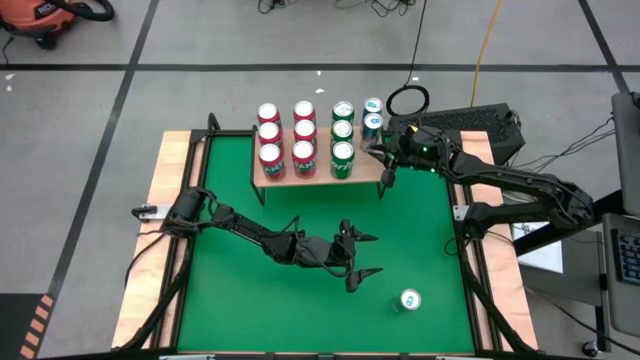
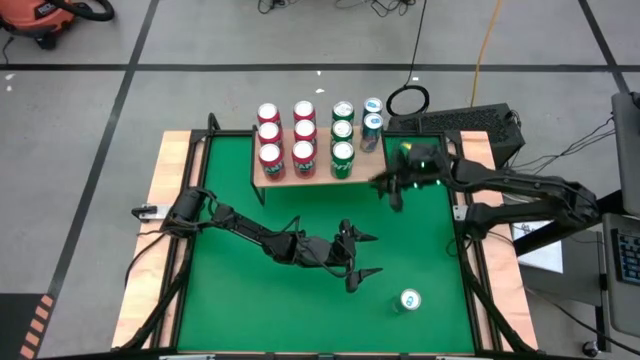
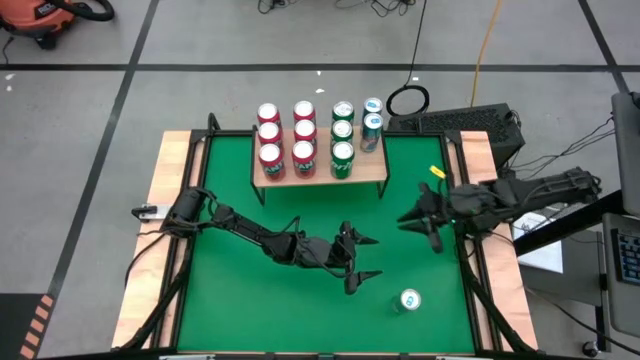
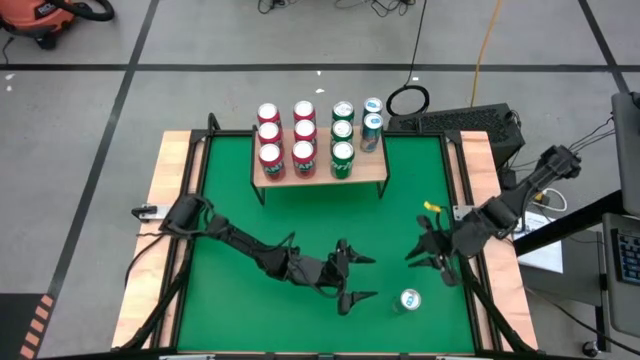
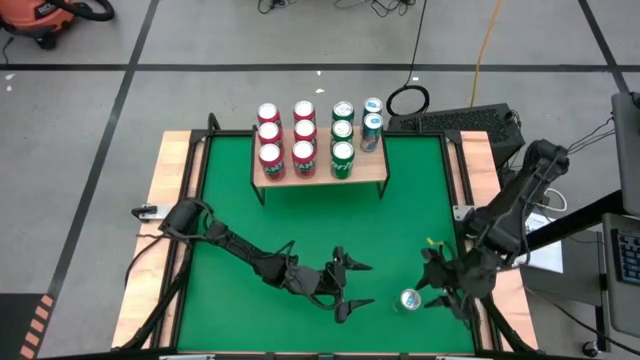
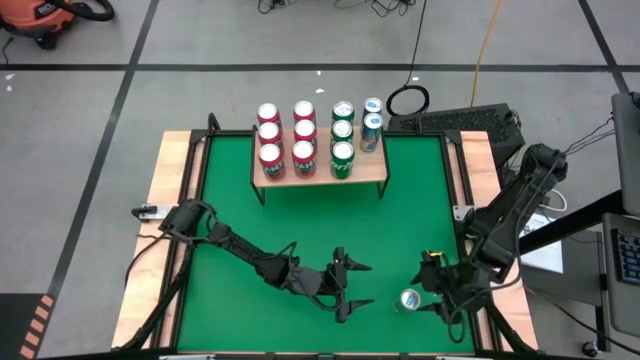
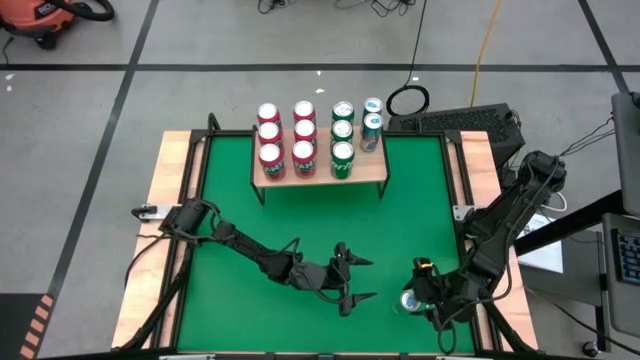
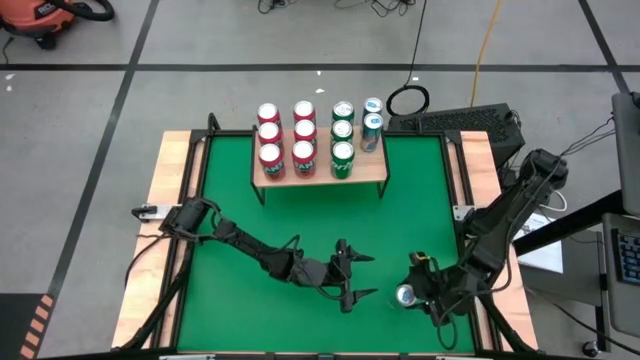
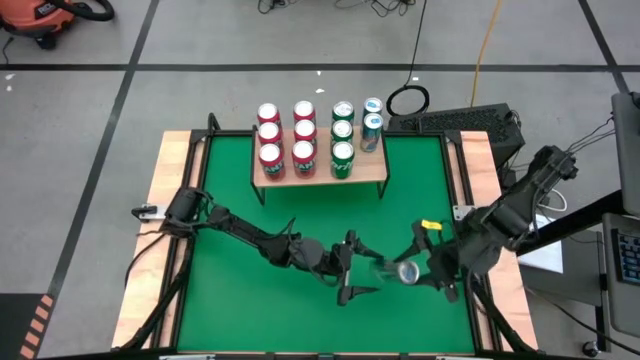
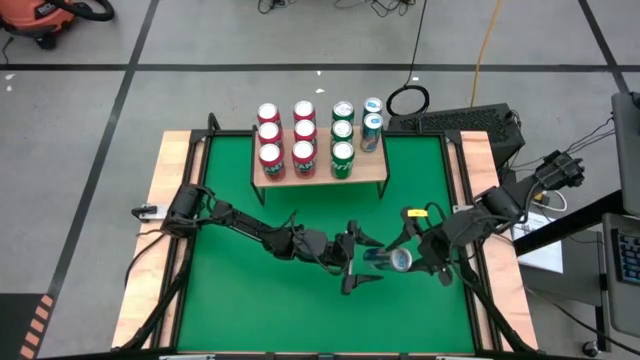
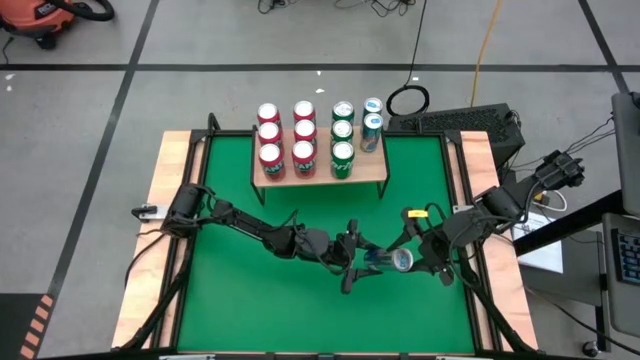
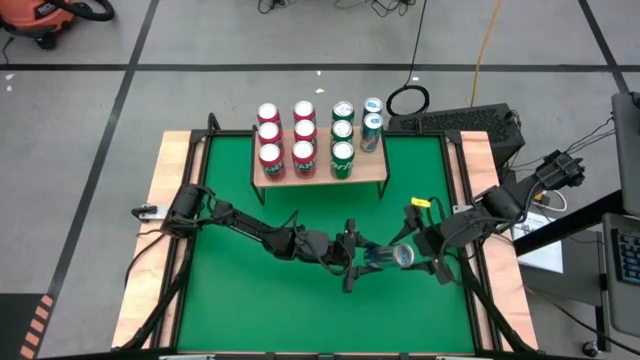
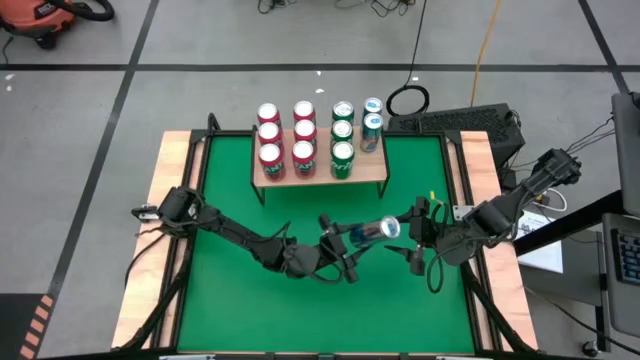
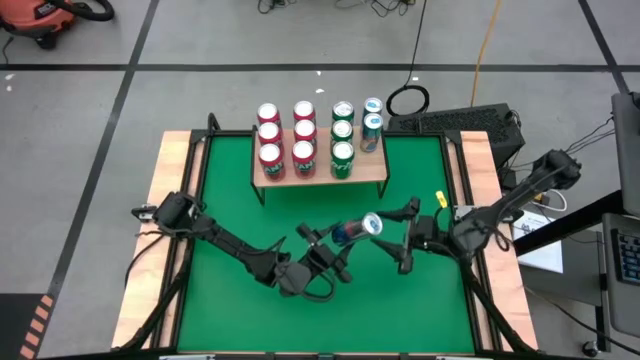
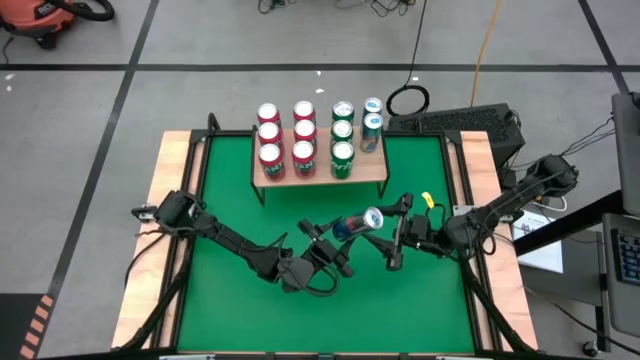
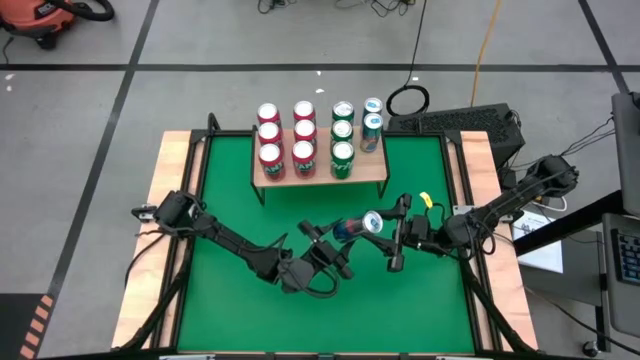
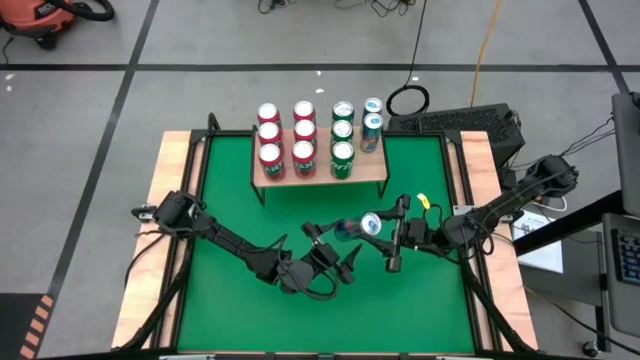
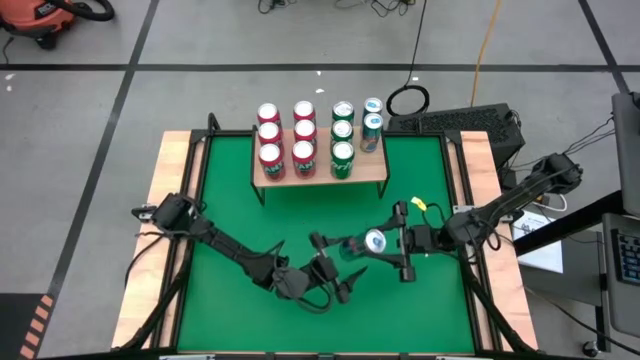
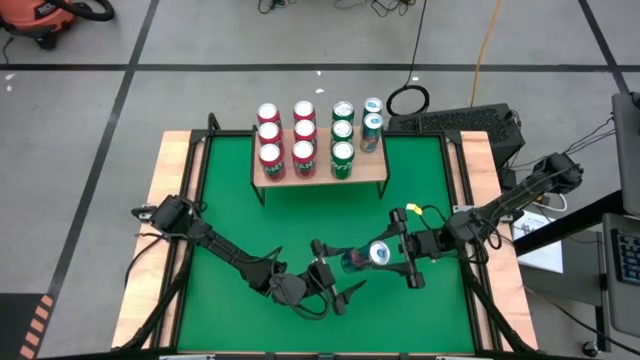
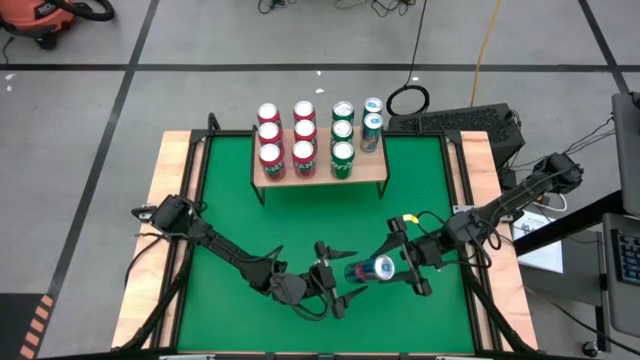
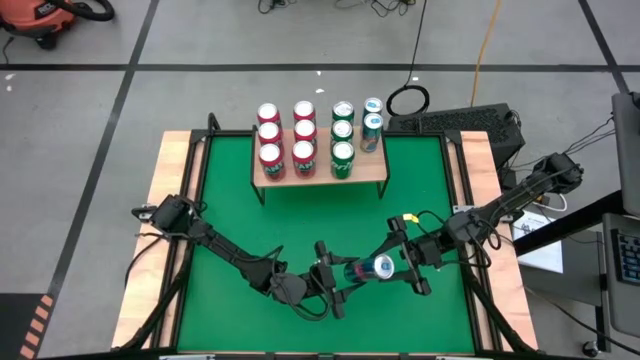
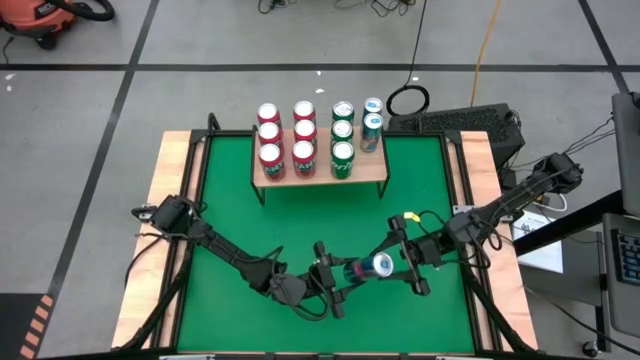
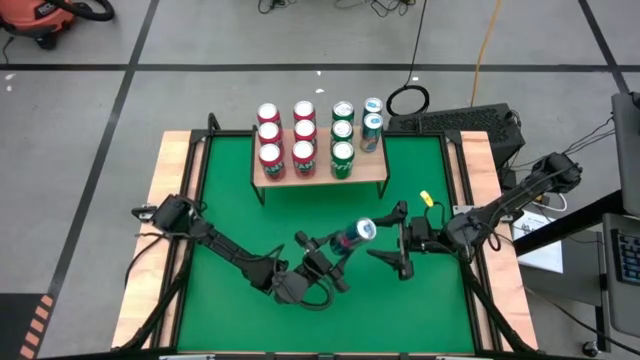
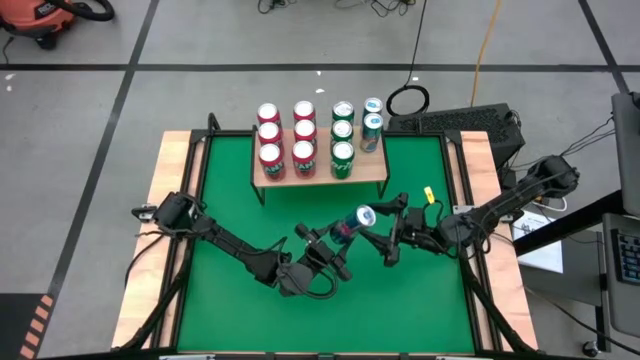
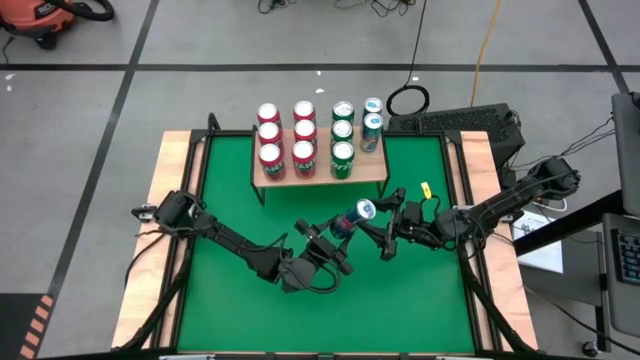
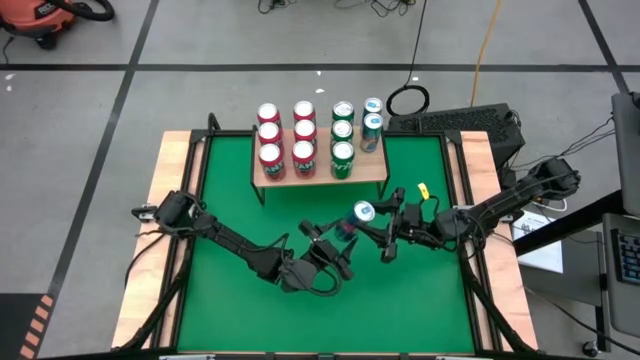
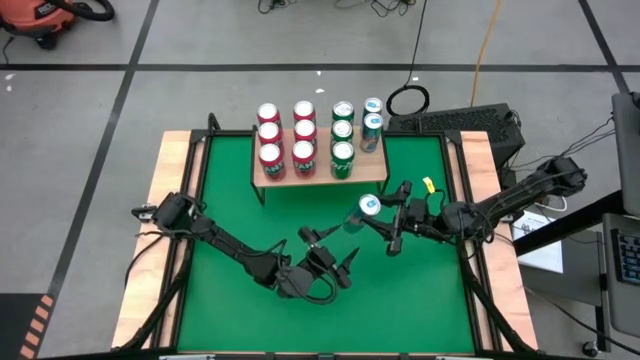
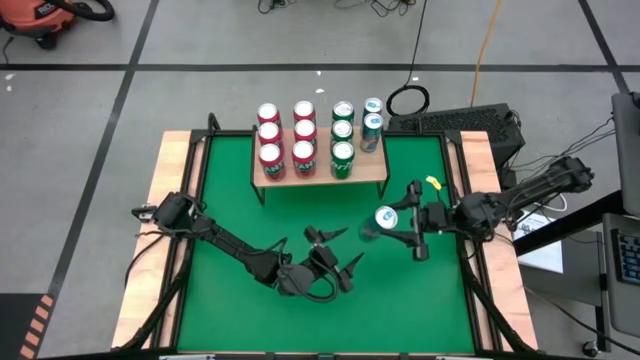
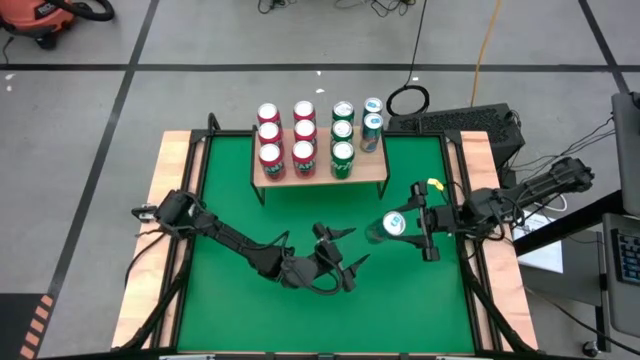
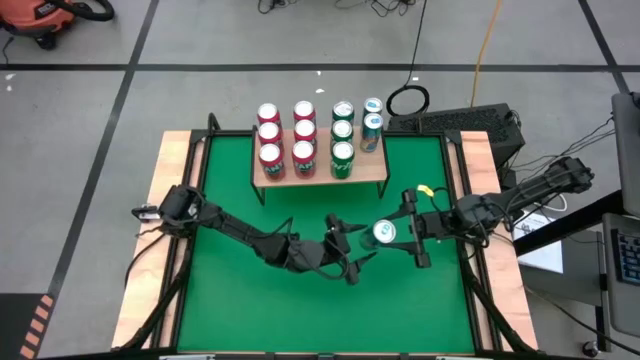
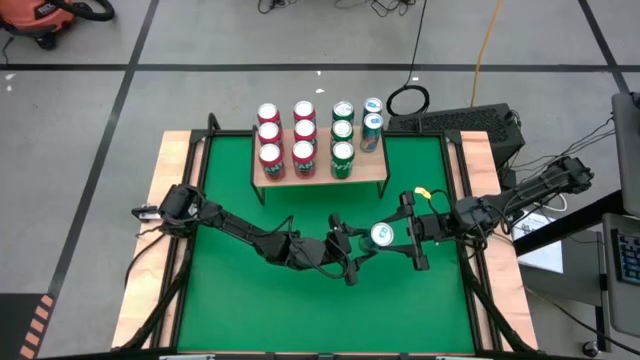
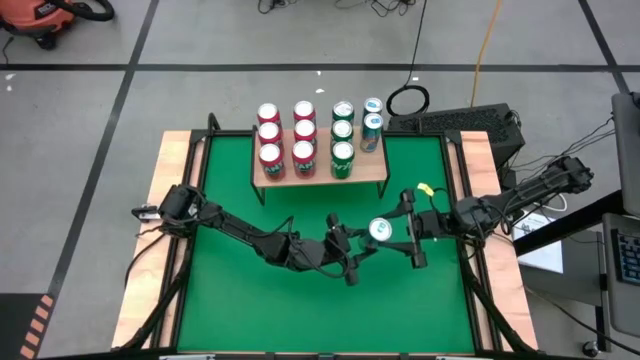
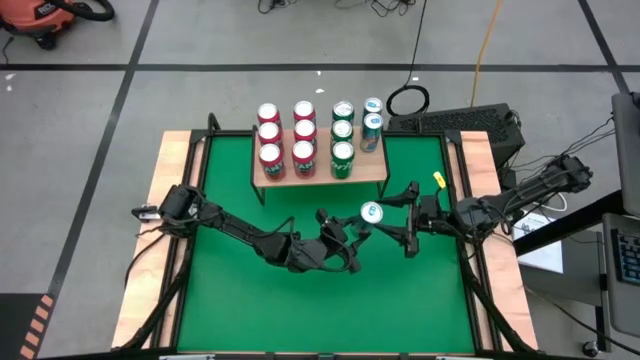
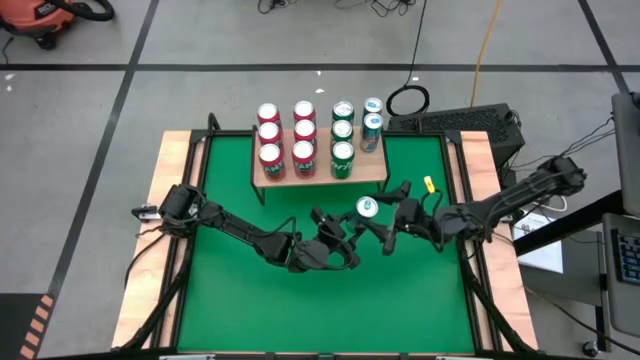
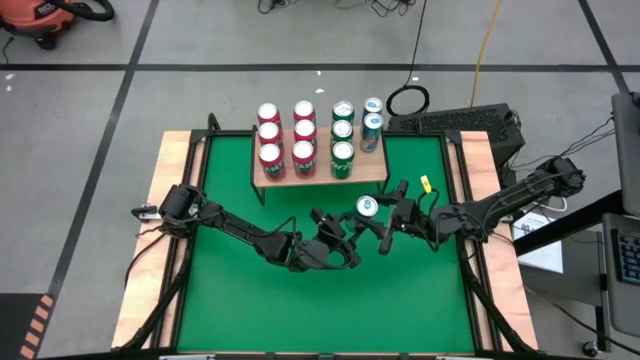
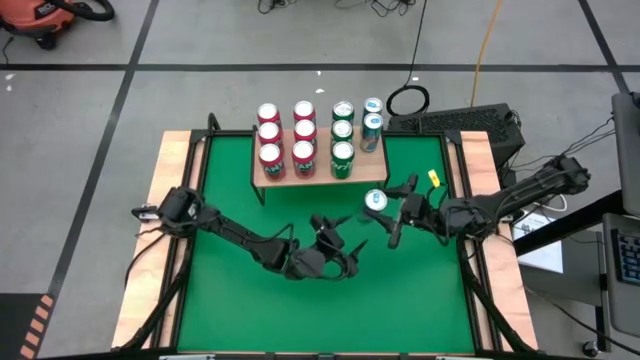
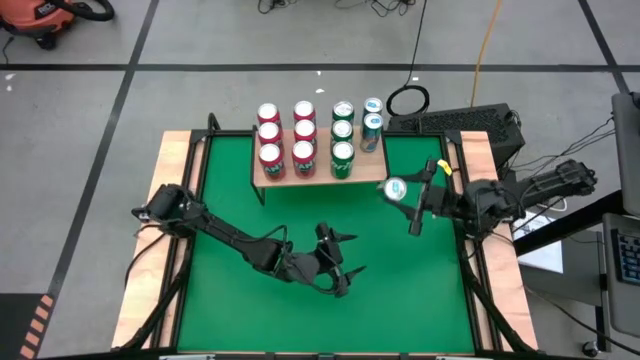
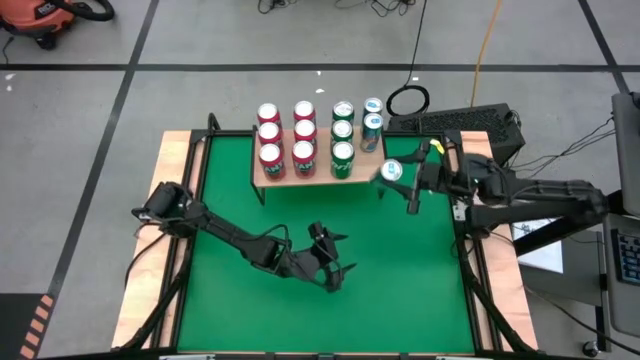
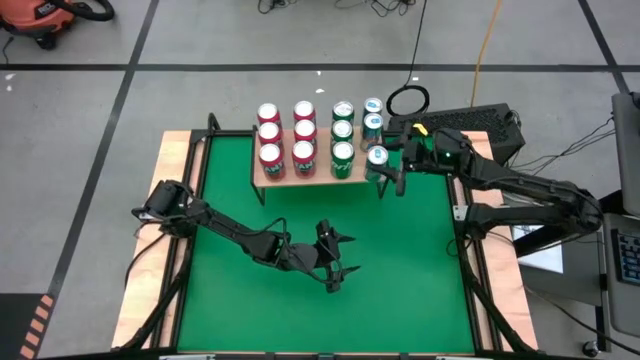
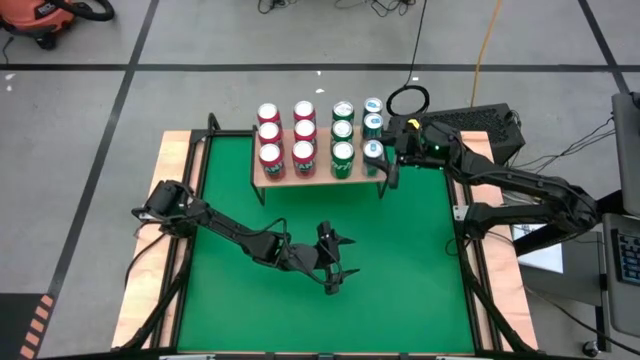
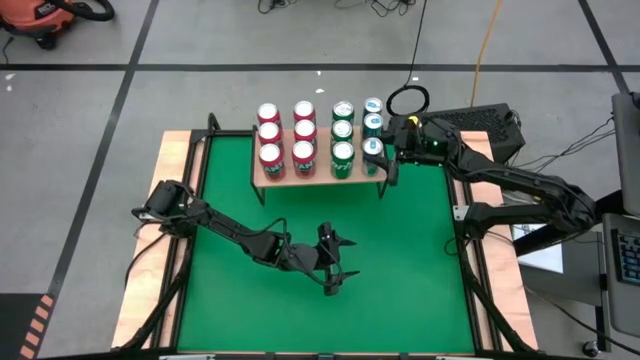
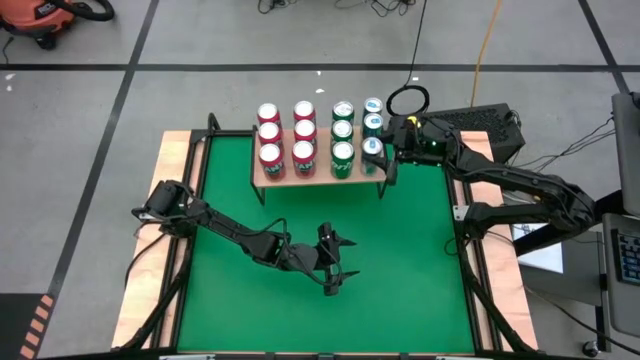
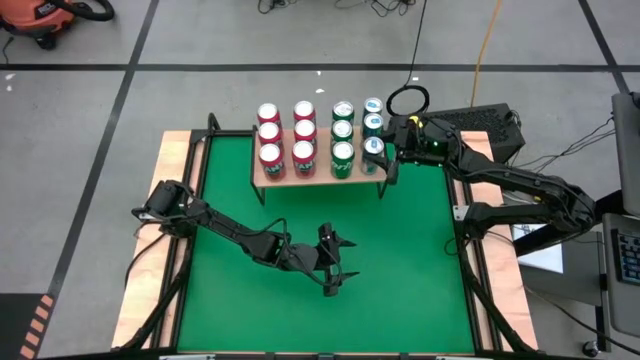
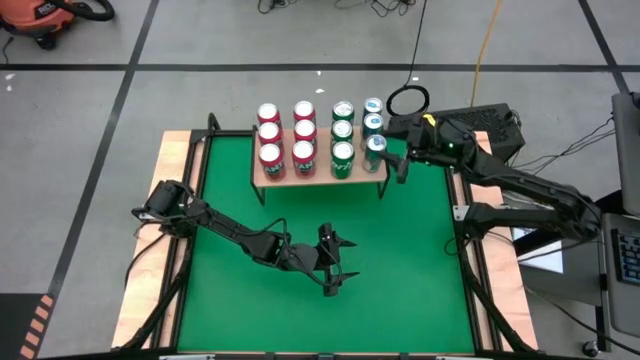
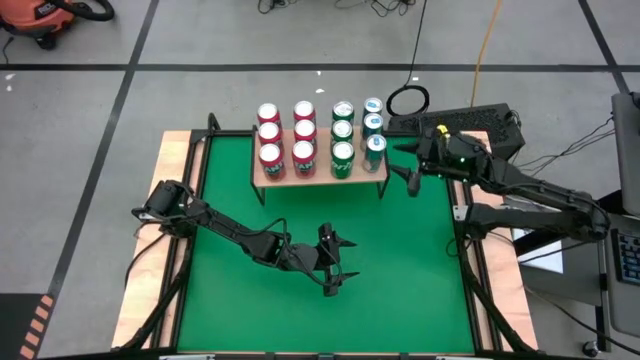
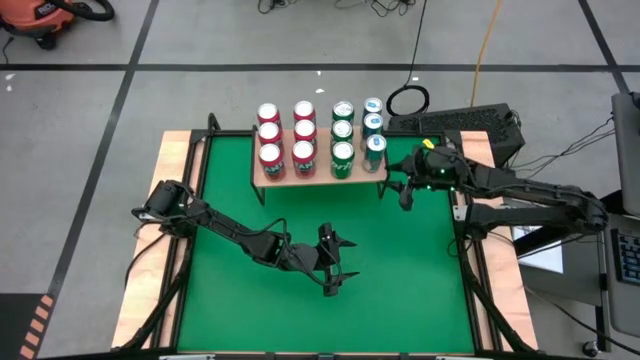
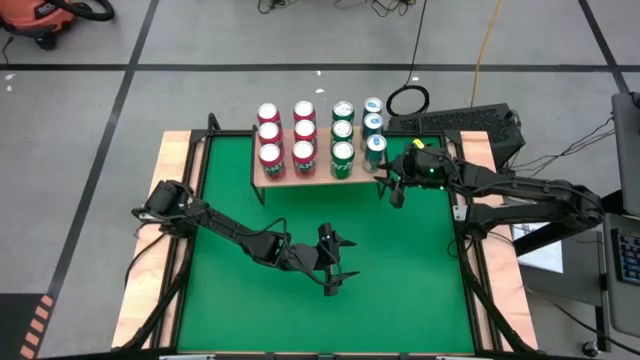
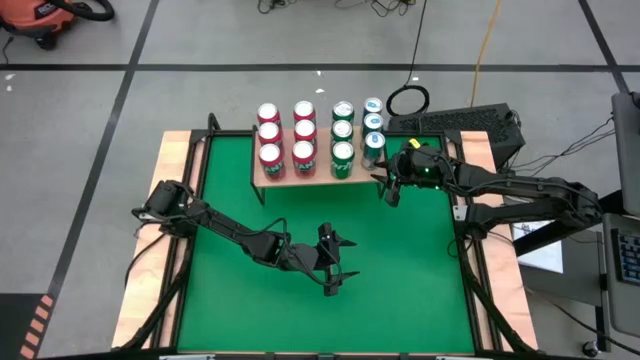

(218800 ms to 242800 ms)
Task: Place canned beverage on shelf
Put the blue soda can on the shelf aligned with the other blue soda cans
